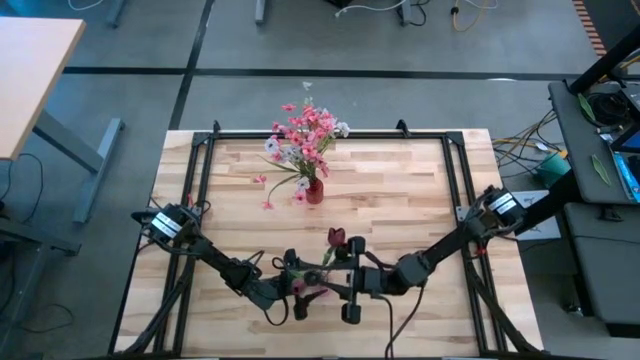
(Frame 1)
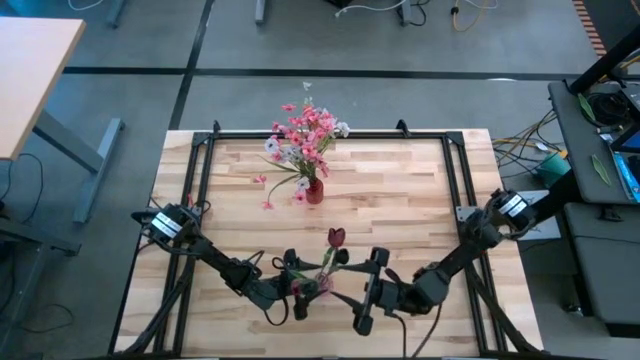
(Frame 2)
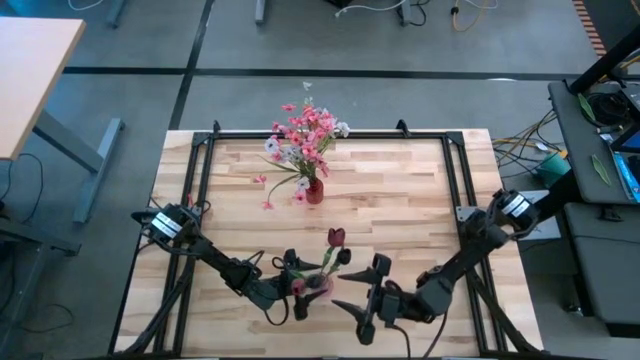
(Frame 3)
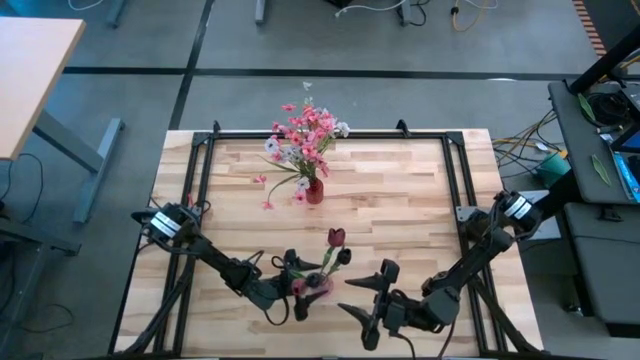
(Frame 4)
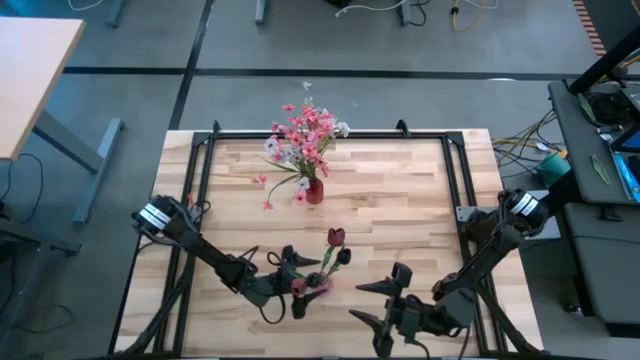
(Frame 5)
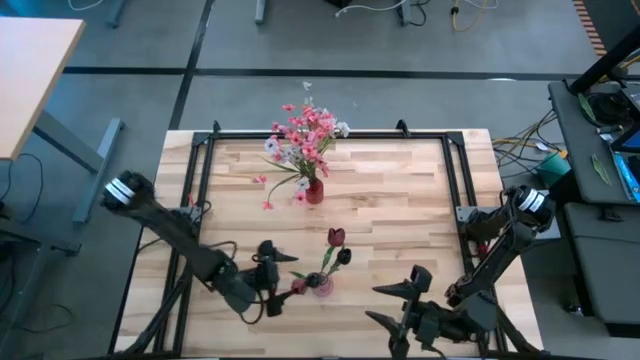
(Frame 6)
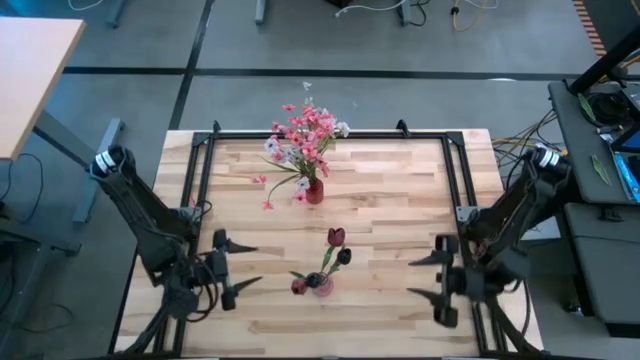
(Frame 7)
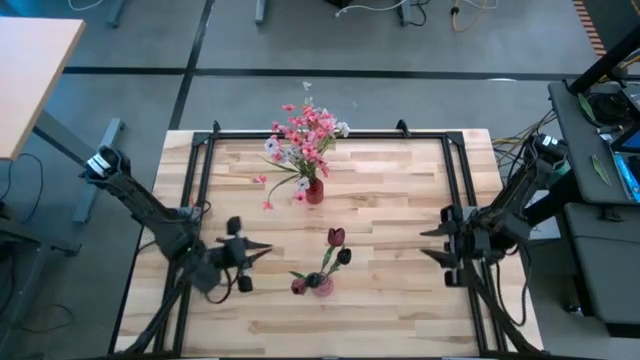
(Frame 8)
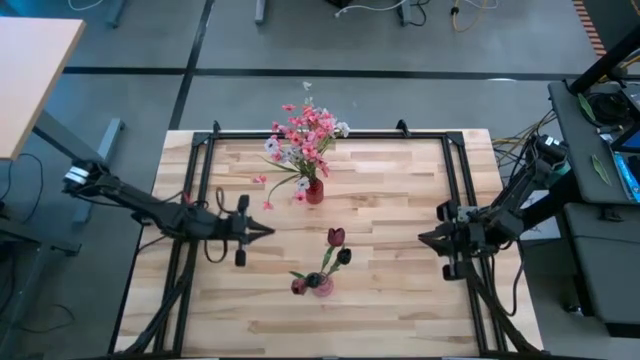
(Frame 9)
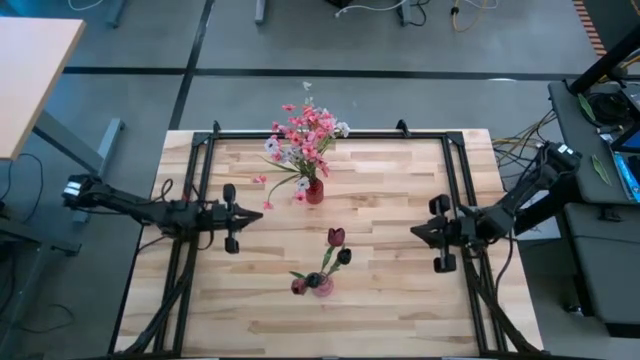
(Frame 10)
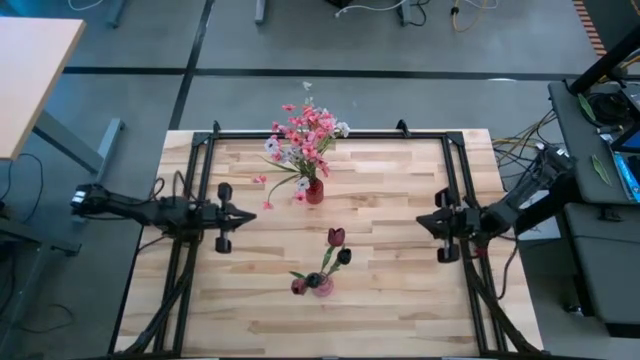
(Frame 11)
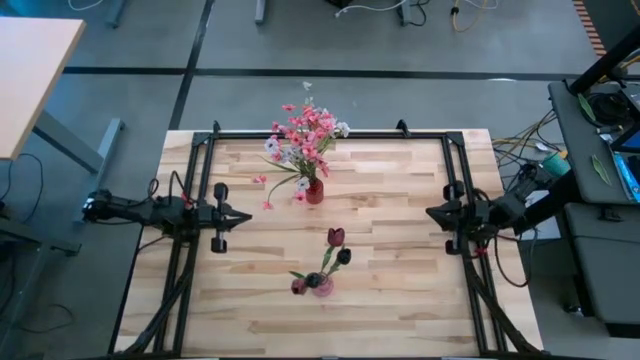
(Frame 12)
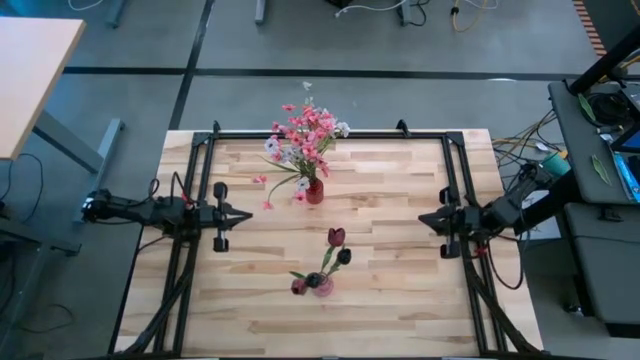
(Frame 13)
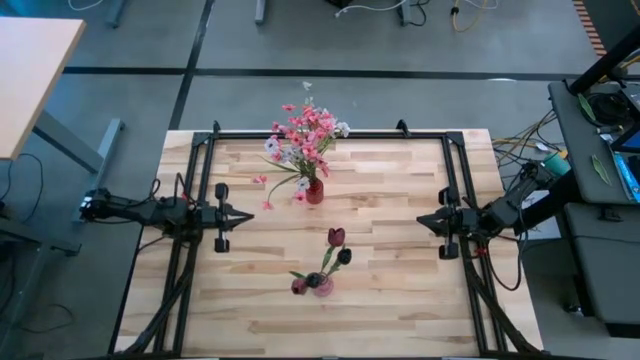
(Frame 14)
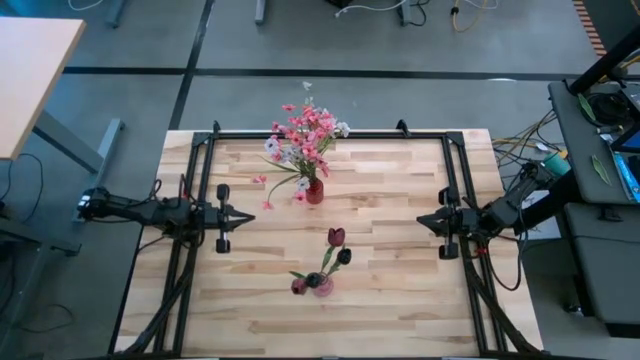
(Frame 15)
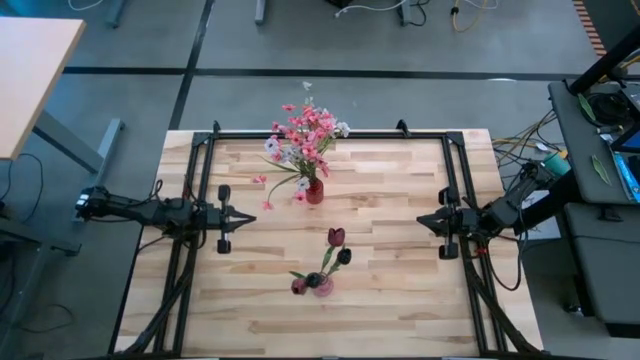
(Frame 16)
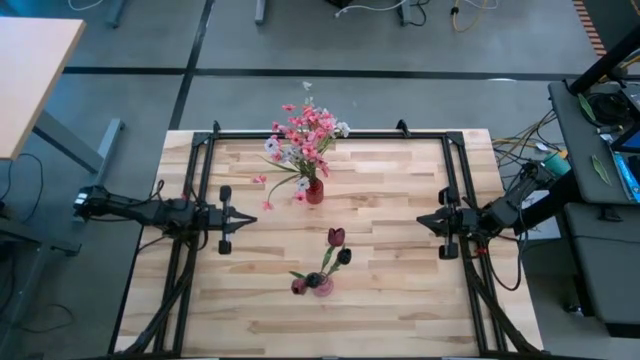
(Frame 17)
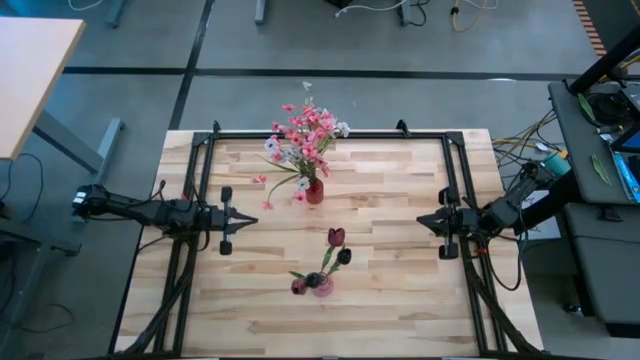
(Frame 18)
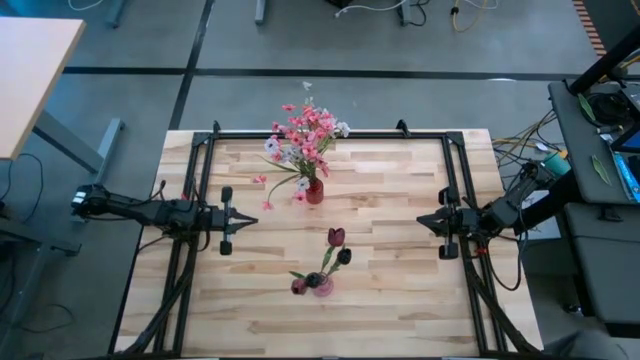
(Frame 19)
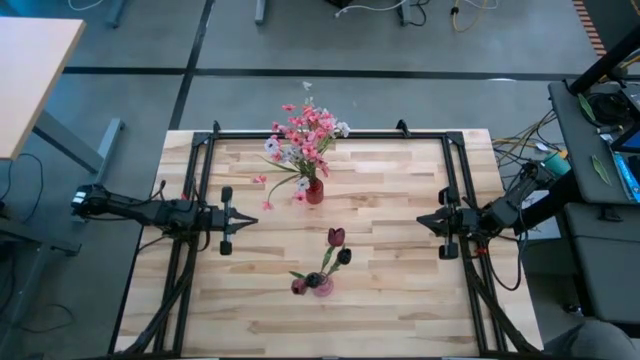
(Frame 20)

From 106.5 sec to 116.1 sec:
Task: Sort flowers into vase by color
Return to Home Position

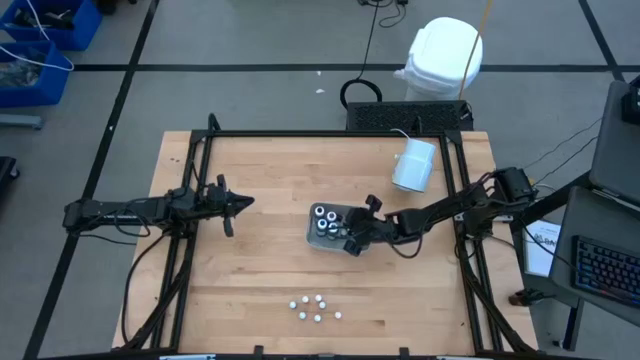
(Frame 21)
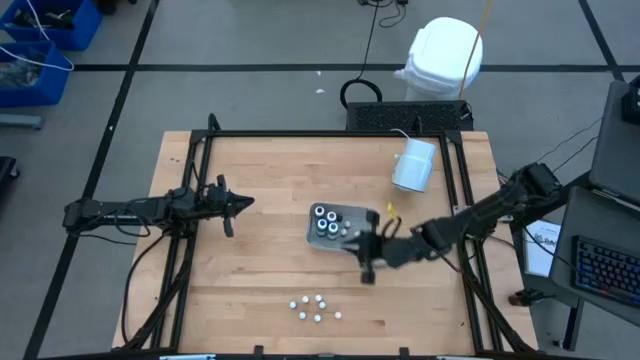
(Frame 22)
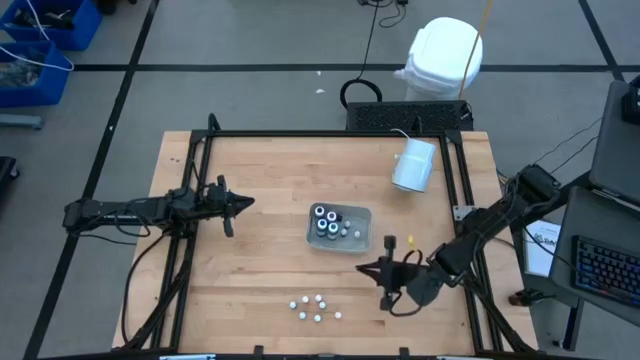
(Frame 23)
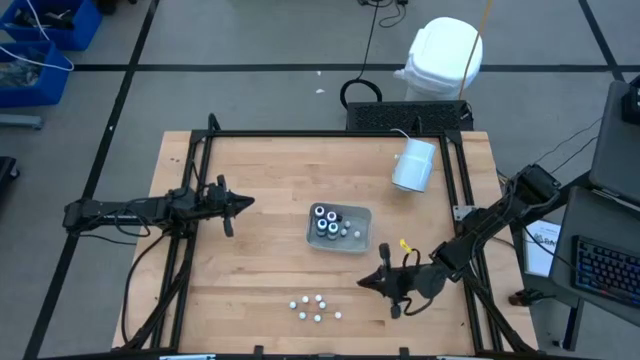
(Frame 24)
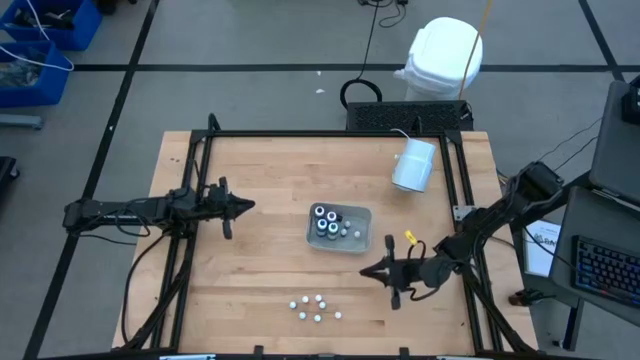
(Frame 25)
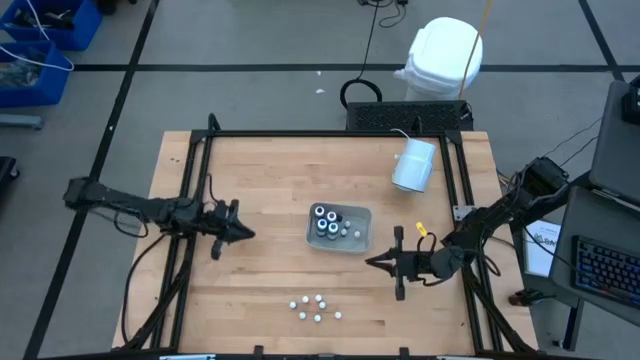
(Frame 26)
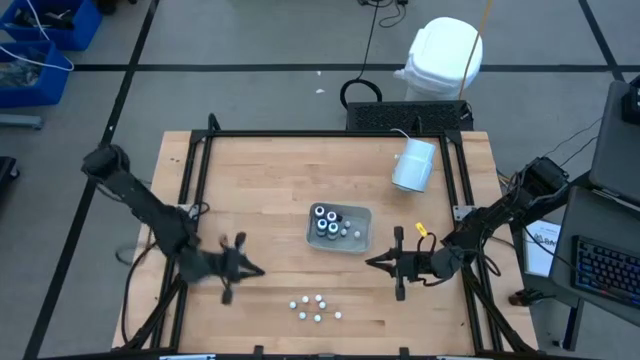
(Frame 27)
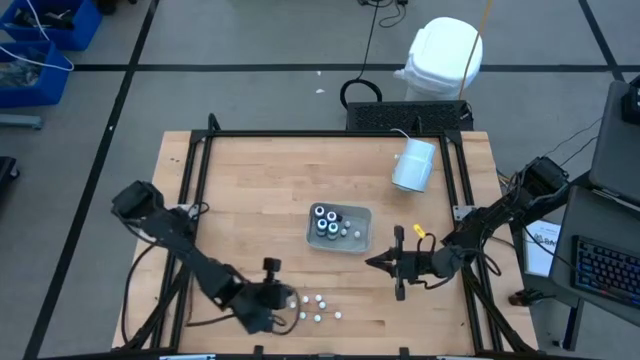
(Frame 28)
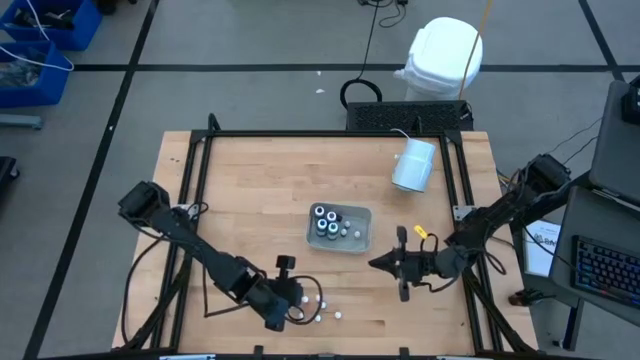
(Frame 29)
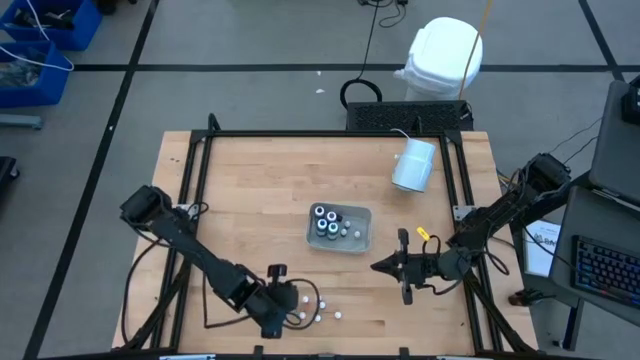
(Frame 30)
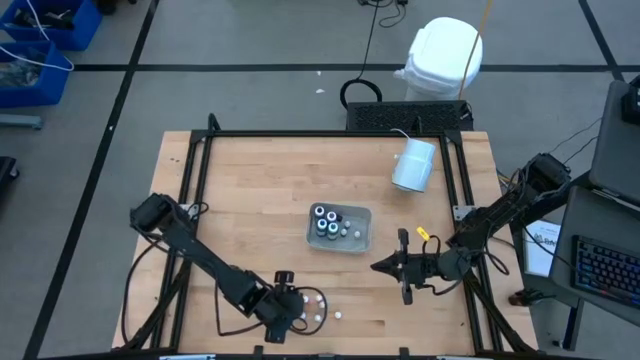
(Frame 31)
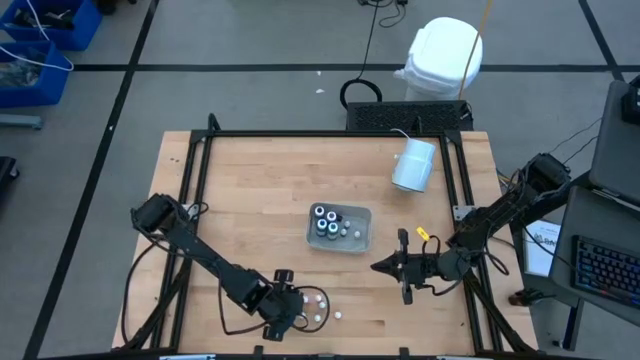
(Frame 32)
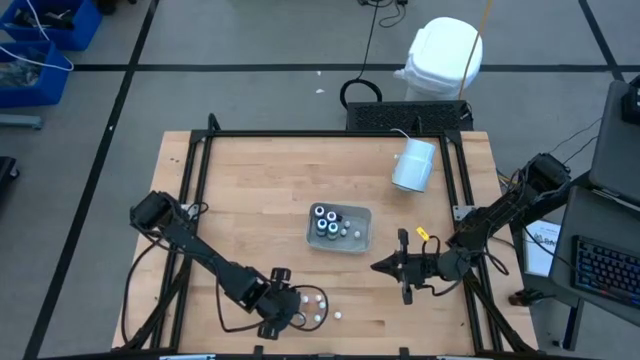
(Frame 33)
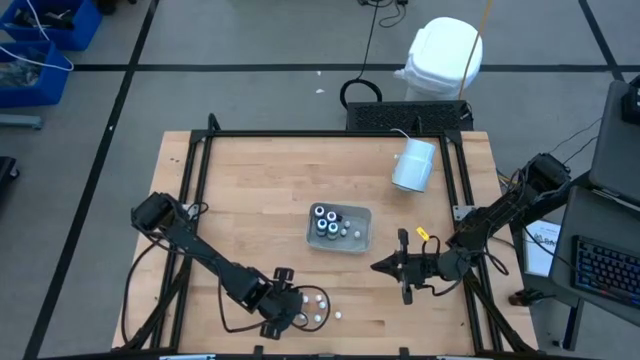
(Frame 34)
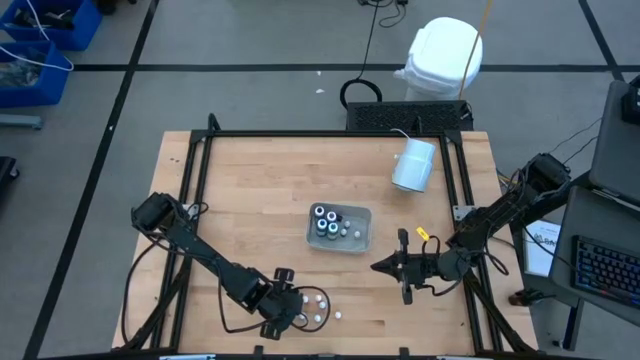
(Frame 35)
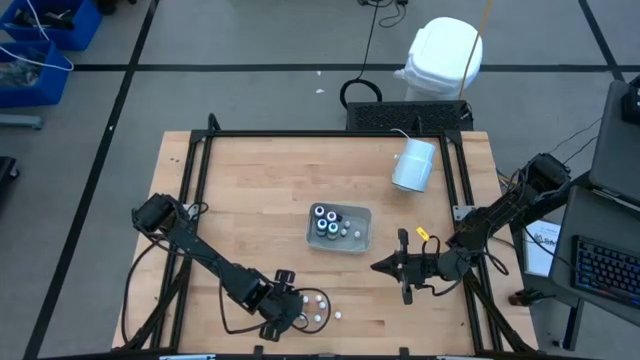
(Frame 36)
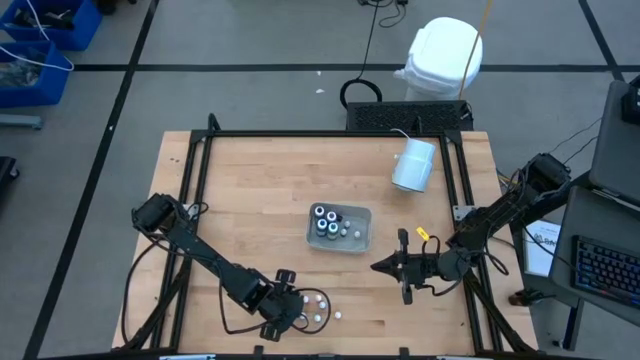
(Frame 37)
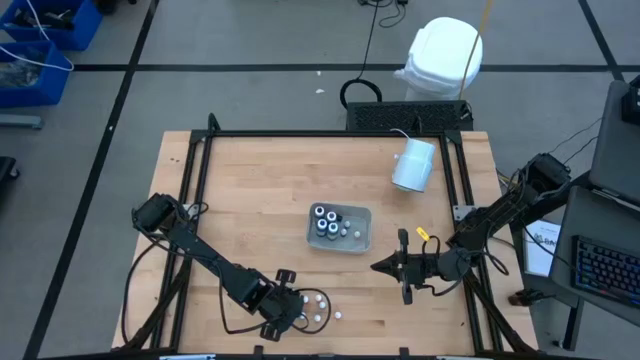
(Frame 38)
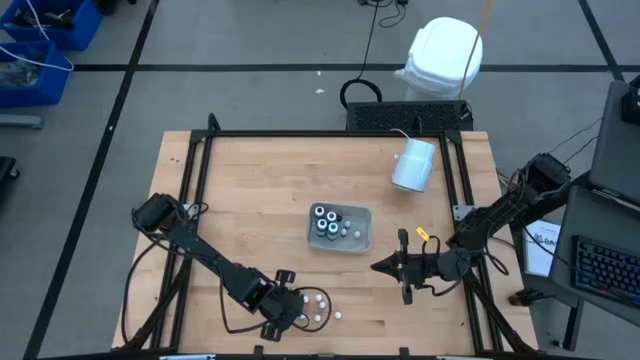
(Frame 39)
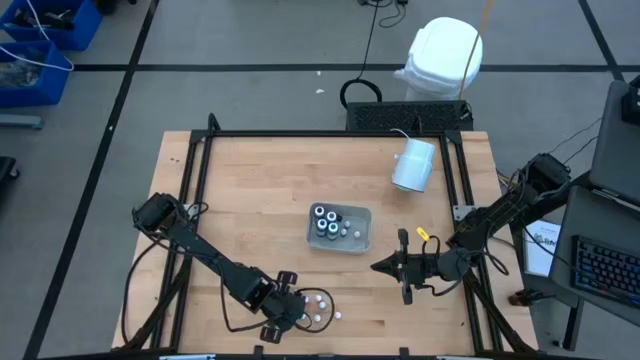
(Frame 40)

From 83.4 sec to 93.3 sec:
Task: Pick & Place food coloring
Put the small dark blue bottle into the gray bin
